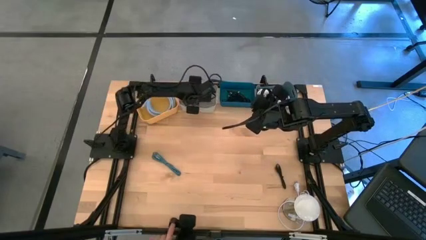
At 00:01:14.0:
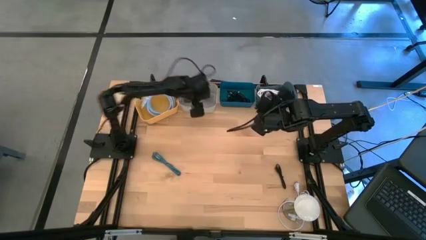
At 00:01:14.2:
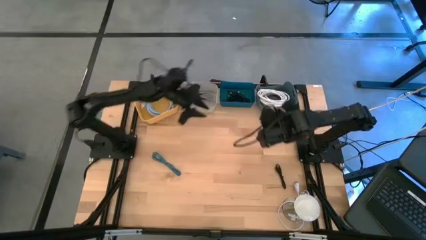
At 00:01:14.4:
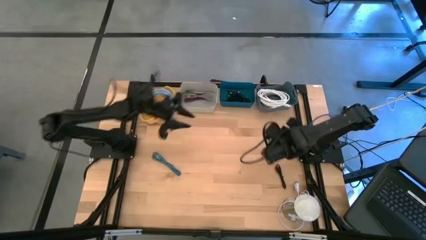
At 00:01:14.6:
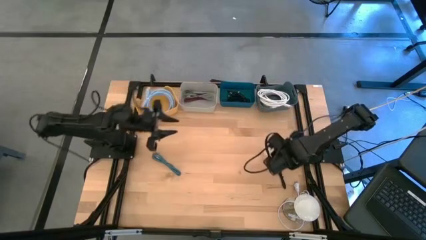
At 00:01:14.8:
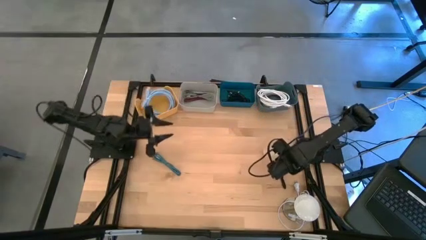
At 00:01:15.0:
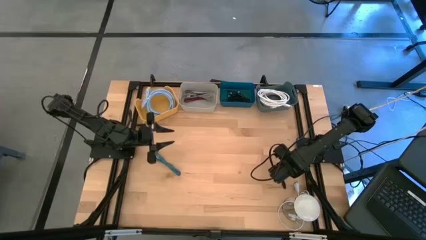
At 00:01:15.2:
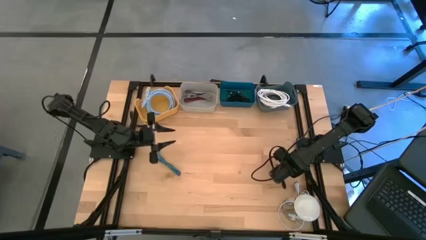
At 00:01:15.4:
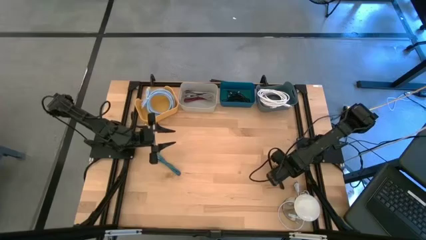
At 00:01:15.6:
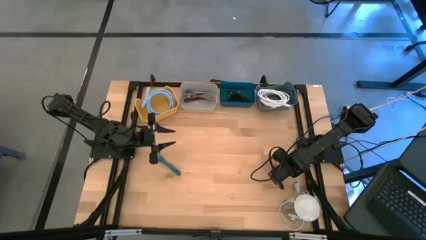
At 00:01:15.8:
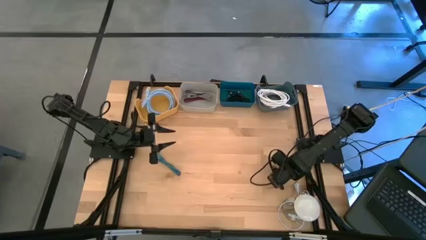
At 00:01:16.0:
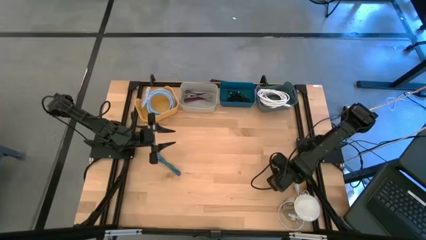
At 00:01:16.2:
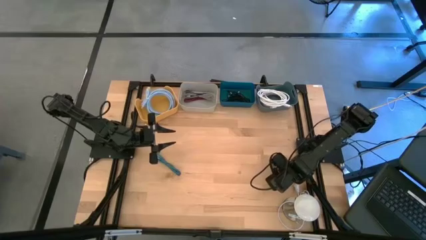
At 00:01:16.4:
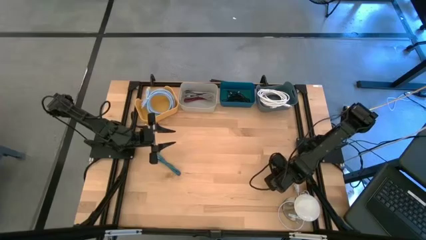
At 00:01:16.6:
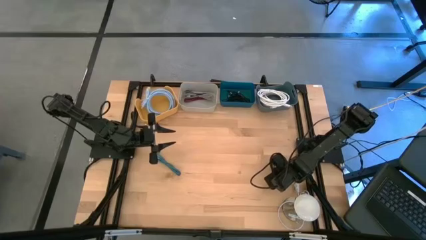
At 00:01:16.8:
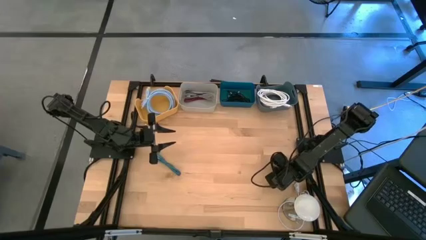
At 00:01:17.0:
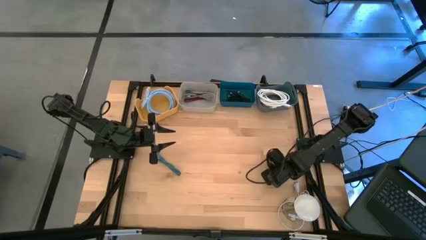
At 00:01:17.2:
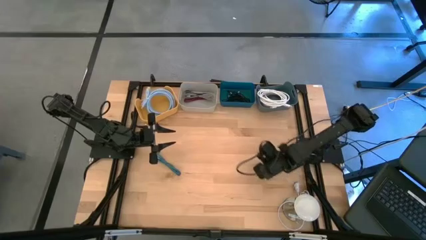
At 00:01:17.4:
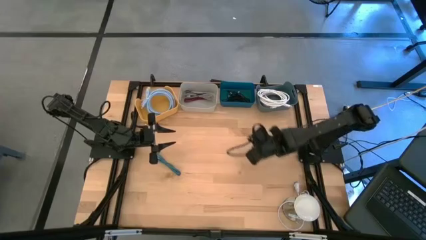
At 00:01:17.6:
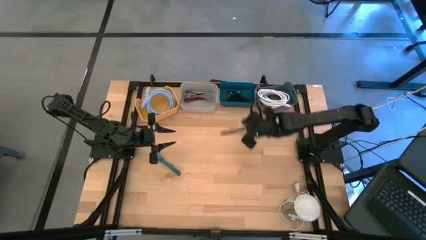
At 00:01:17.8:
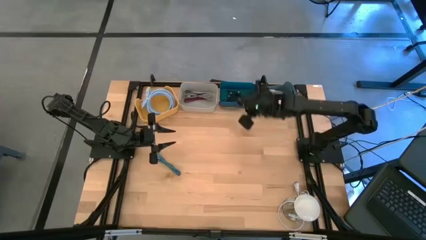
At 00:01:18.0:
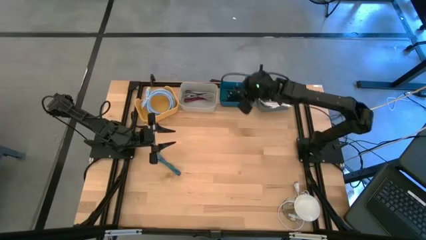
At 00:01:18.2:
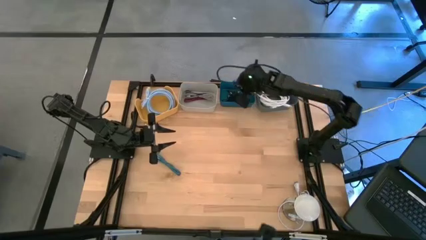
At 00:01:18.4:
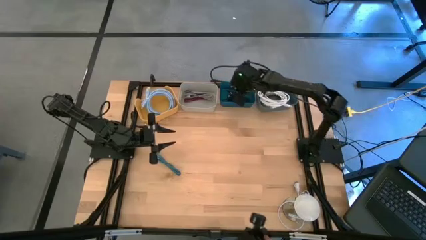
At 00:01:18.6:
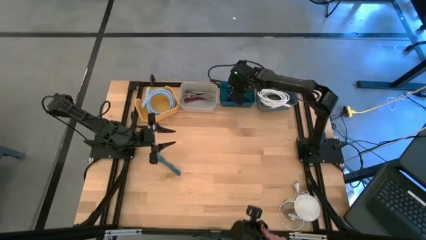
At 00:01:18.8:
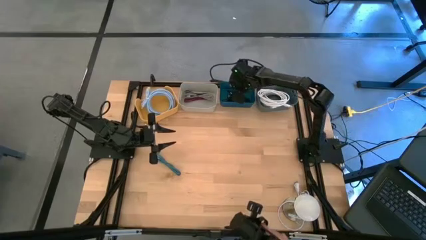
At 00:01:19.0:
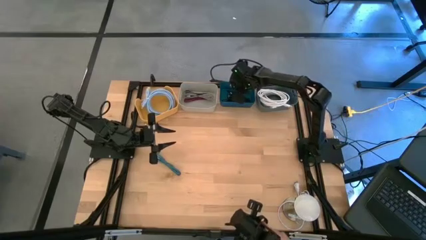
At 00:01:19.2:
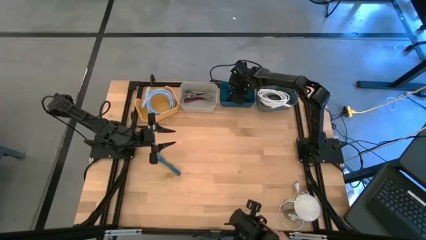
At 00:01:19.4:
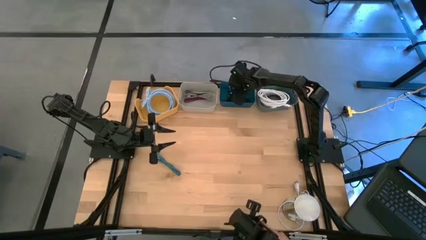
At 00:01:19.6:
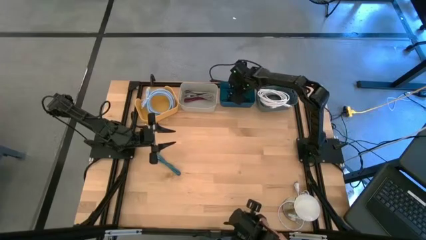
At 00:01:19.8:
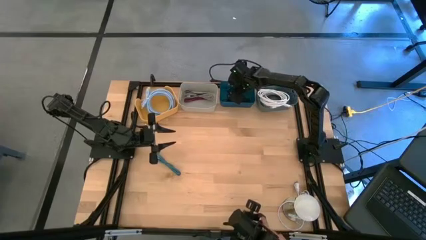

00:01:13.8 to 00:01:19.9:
Task: Pick & Place USB Port
Put the black charger cable into the dark blue bin

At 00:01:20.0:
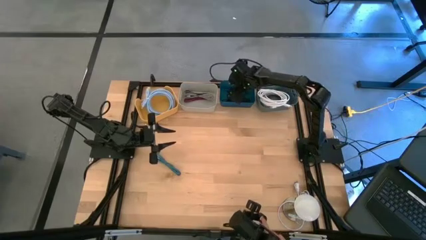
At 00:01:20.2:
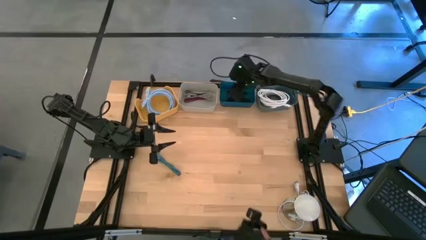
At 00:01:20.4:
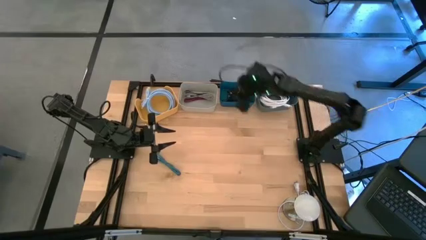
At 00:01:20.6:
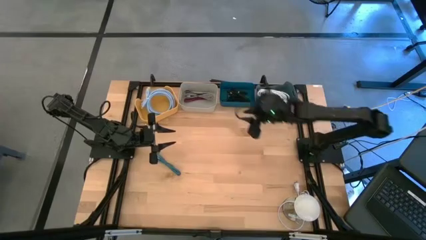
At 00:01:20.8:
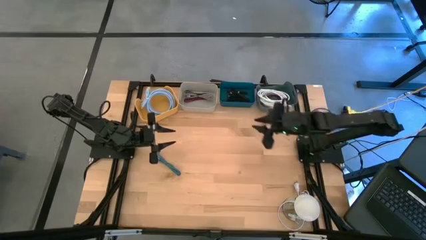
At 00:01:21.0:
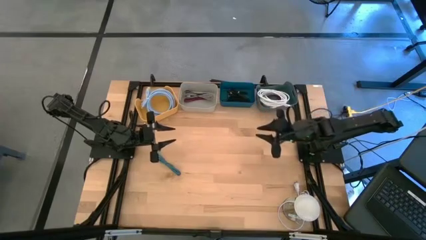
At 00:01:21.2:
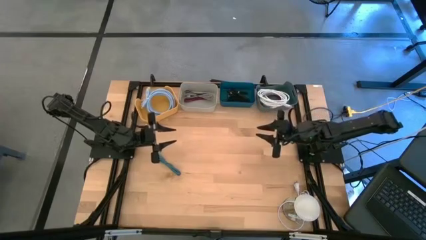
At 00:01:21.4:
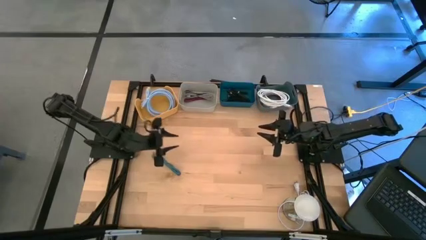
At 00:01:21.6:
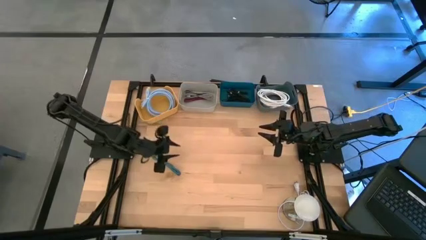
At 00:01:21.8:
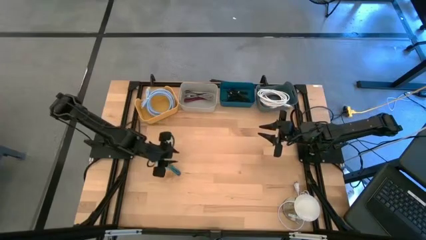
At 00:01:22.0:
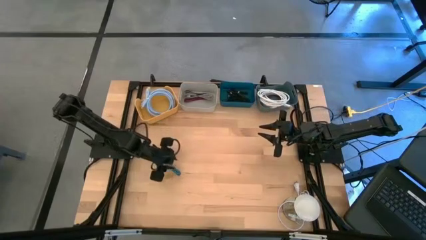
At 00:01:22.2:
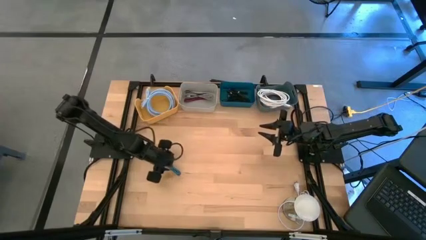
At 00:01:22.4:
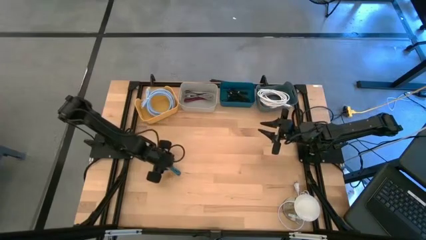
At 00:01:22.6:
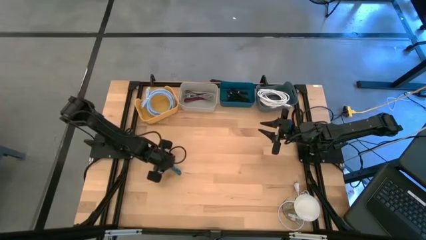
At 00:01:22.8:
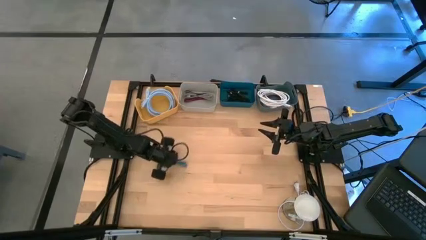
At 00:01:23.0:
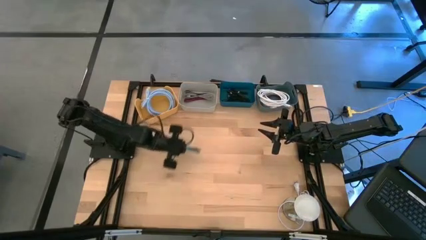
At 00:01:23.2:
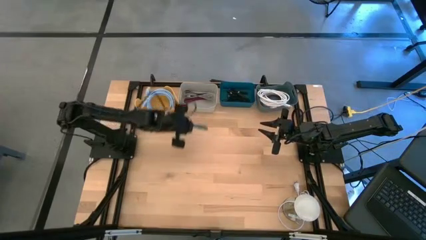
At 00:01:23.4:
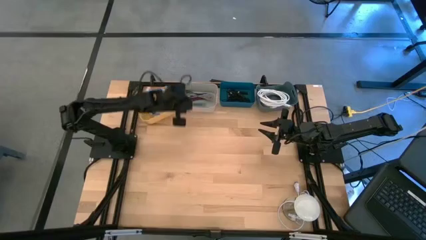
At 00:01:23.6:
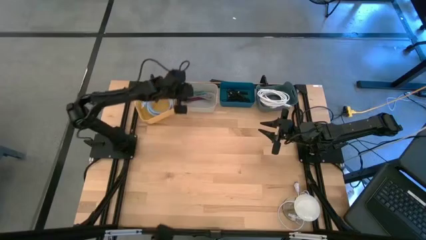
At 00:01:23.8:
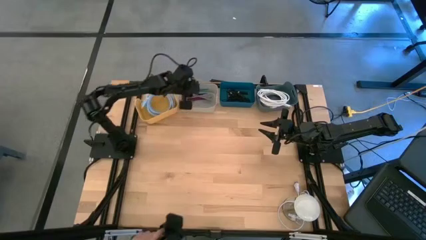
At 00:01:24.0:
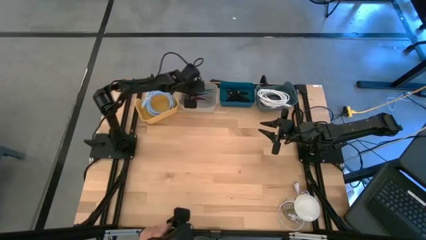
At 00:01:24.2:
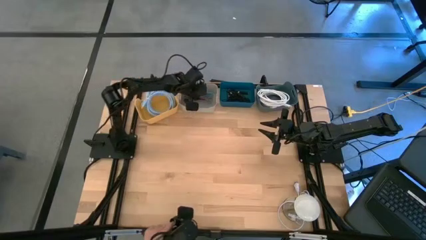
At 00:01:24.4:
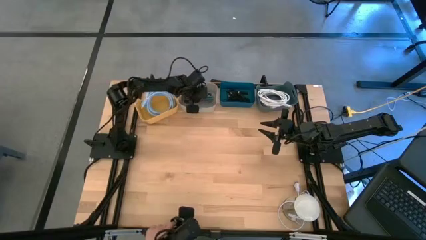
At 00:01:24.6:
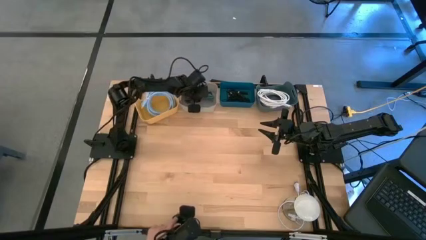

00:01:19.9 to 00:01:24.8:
Put the blue charger cable into the gray bin

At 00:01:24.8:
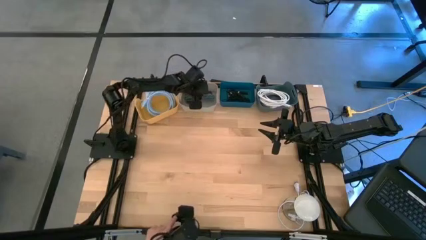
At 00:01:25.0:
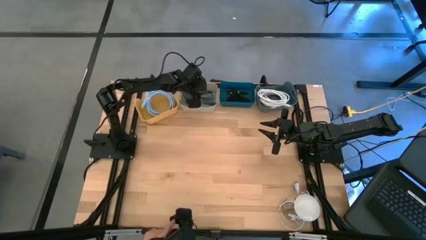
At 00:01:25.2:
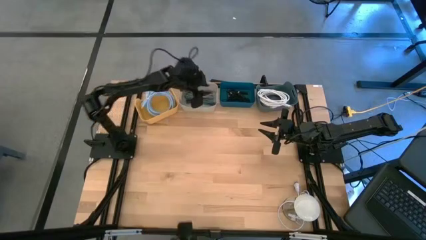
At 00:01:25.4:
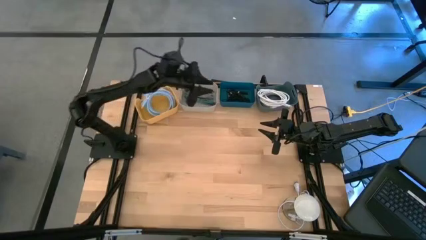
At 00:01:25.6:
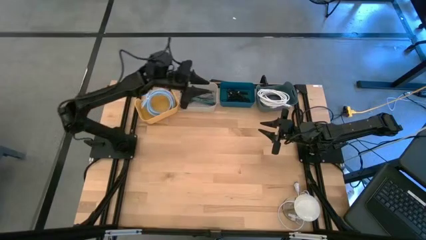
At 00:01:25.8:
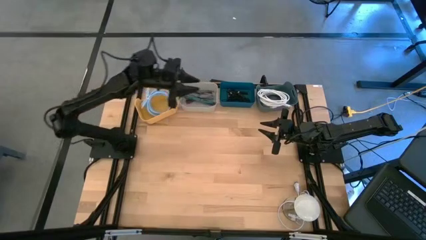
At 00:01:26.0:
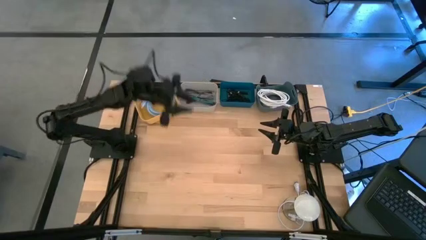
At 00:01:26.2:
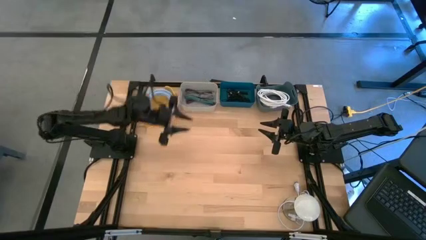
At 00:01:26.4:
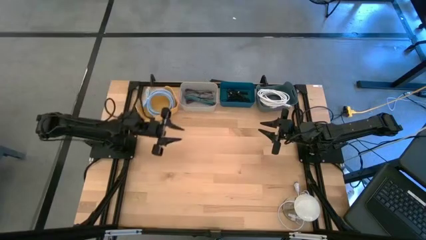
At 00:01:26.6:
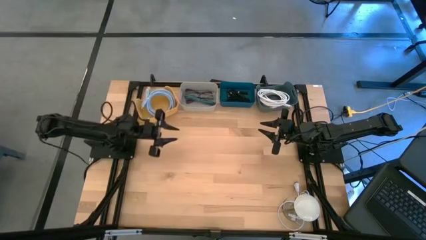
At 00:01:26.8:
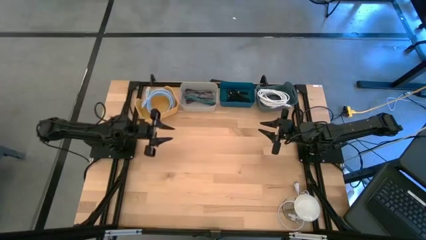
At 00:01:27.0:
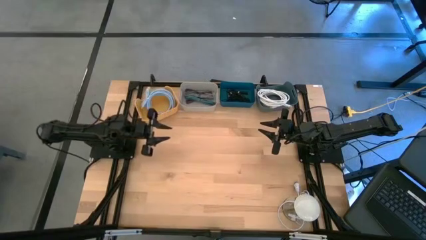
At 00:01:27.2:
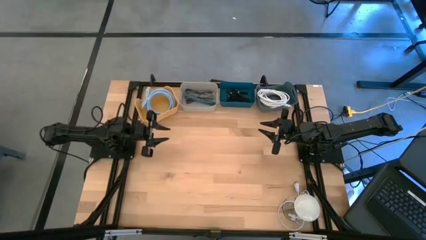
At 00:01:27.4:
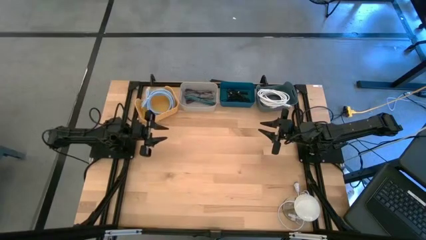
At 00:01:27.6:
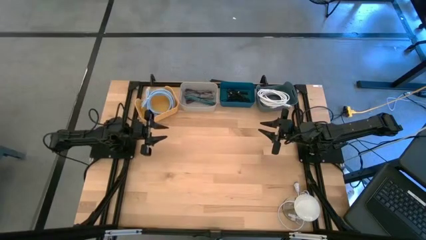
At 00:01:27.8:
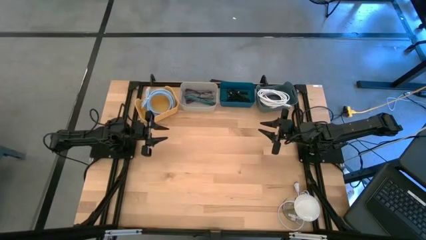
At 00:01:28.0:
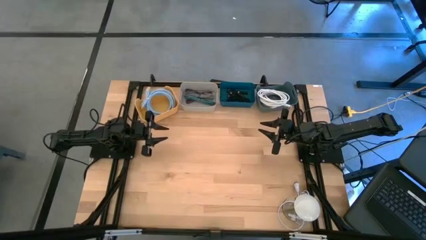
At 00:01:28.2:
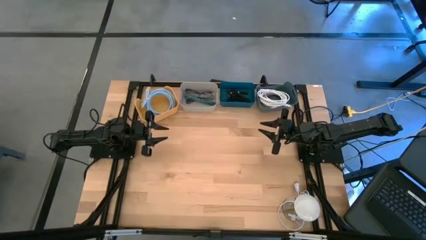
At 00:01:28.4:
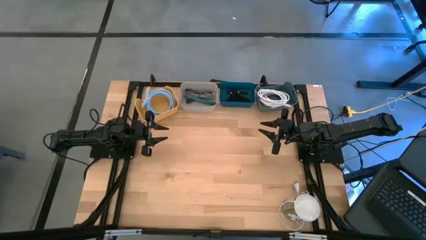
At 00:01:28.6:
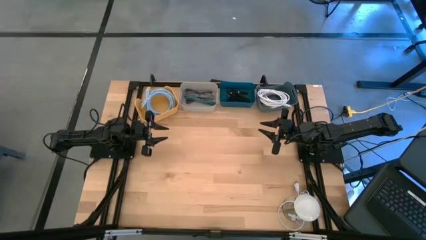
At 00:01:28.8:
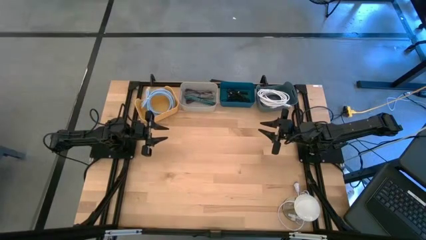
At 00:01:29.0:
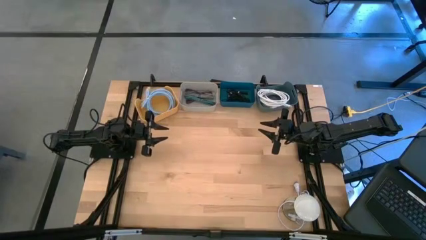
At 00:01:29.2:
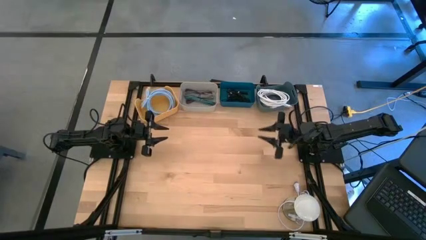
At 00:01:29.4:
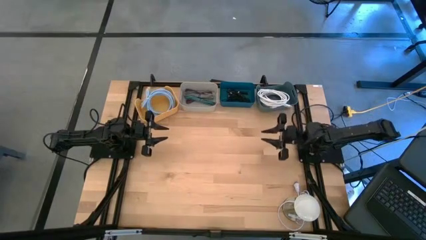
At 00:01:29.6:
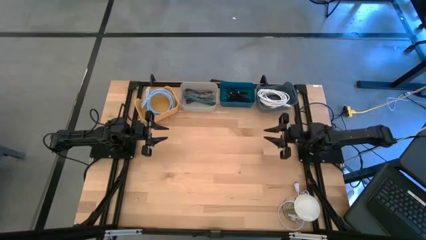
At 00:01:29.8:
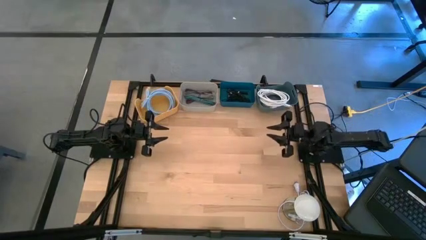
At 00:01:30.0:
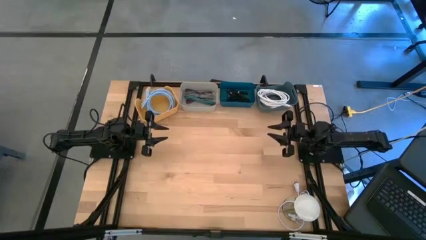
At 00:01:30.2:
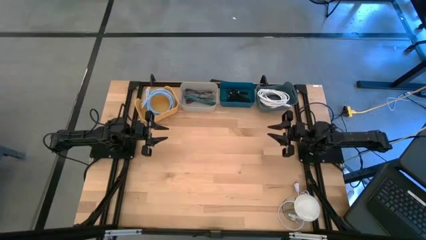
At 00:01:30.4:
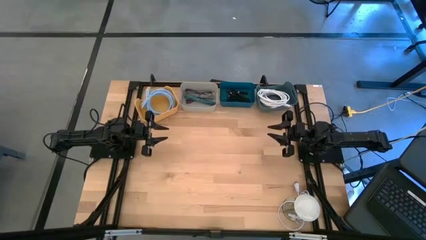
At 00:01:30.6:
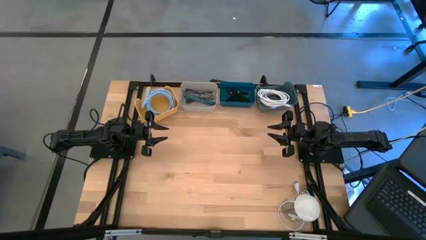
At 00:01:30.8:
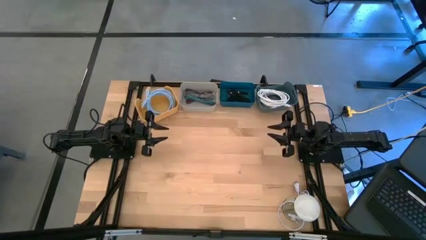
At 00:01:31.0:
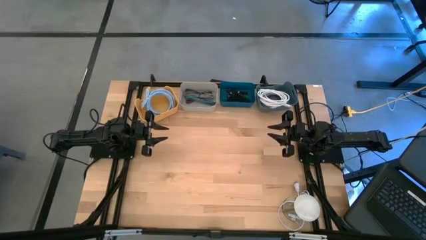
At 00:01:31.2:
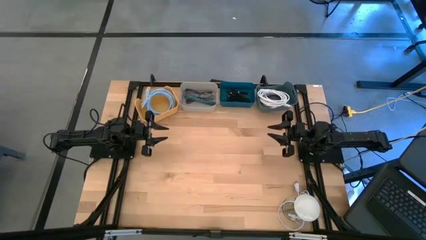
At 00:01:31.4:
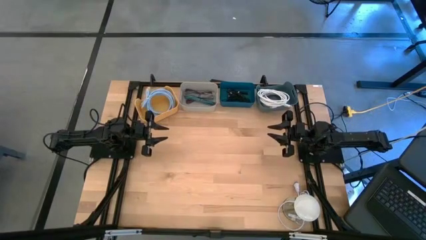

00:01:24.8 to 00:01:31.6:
Return to Home Position
